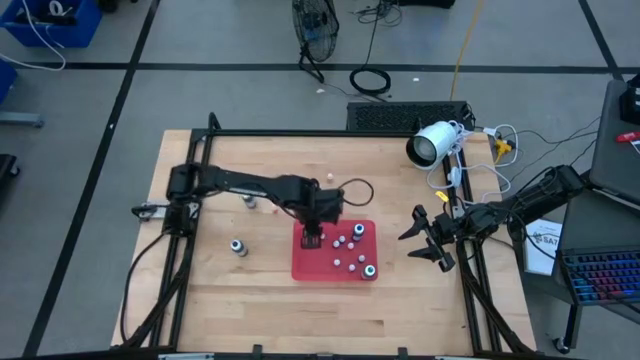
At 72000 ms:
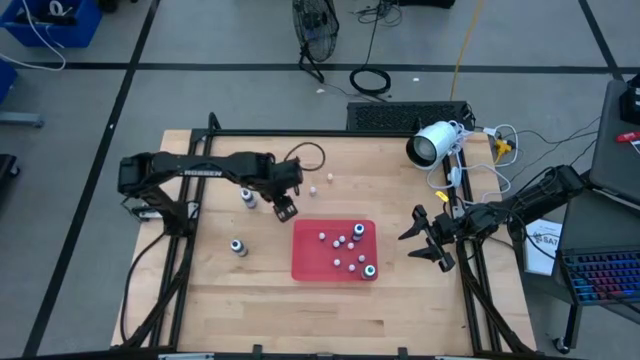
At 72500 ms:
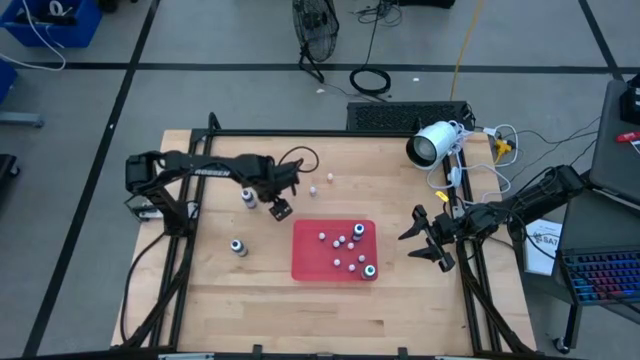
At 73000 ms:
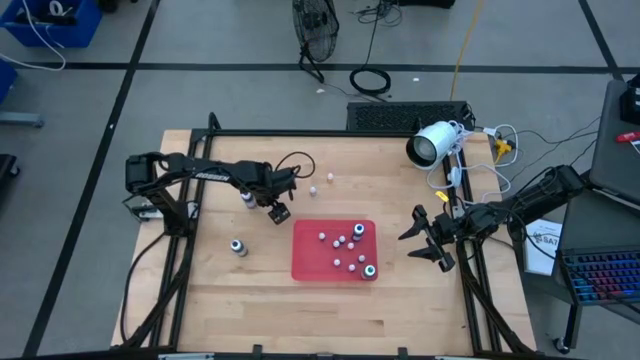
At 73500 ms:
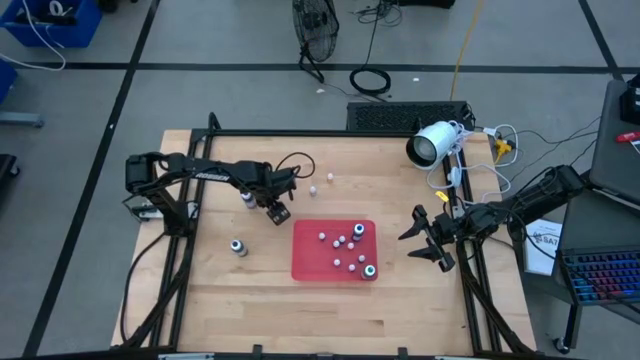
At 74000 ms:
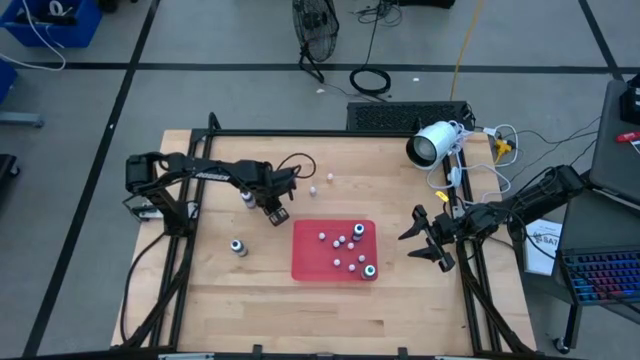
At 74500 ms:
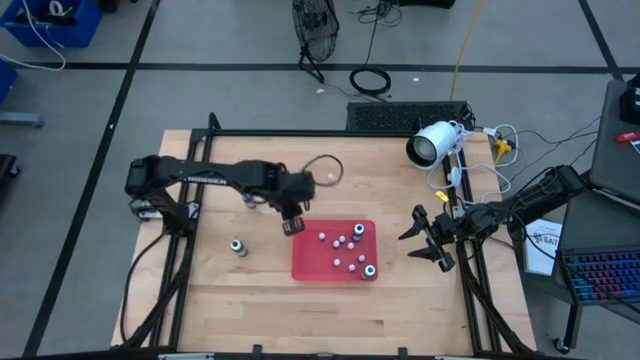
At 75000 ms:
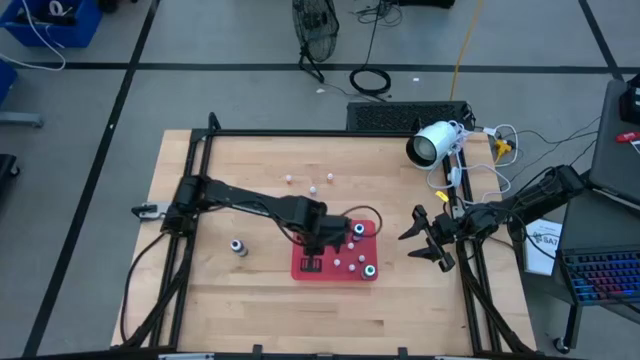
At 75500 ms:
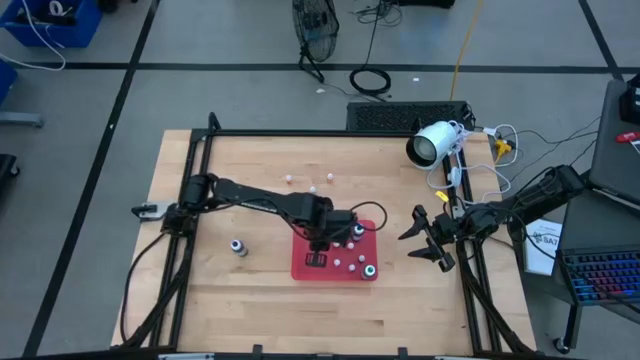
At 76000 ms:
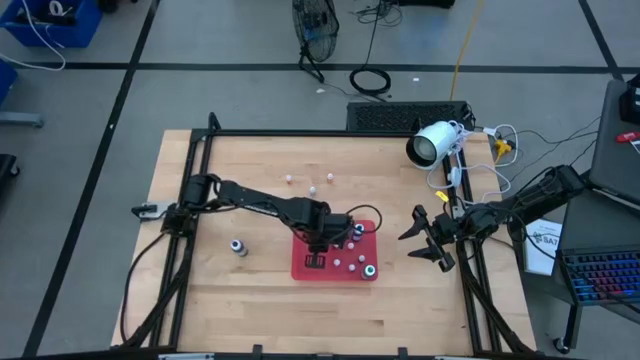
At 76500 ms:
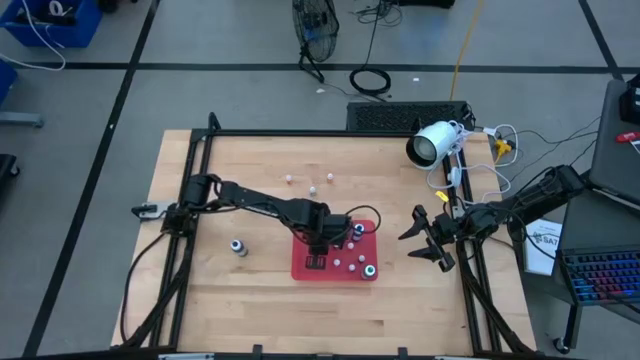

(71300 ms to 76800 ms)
Task: Pick & Place food coloring
Put the small orange food coloring bottle into the pink bin

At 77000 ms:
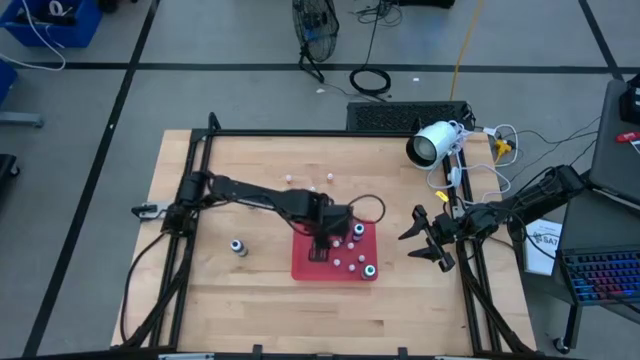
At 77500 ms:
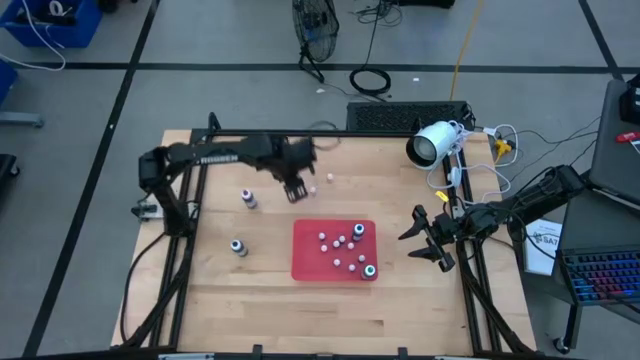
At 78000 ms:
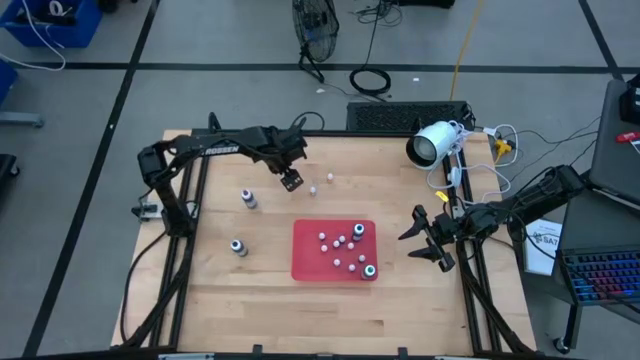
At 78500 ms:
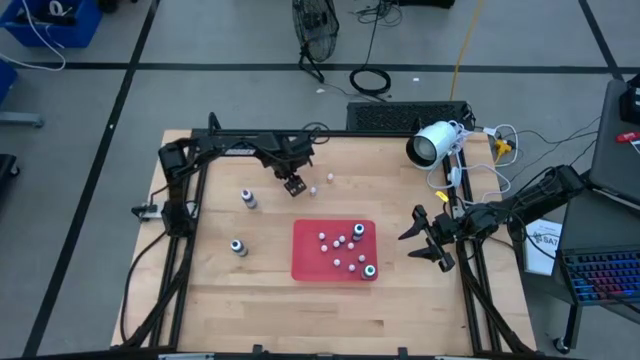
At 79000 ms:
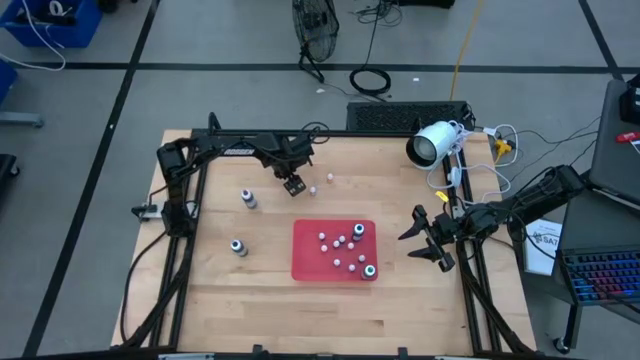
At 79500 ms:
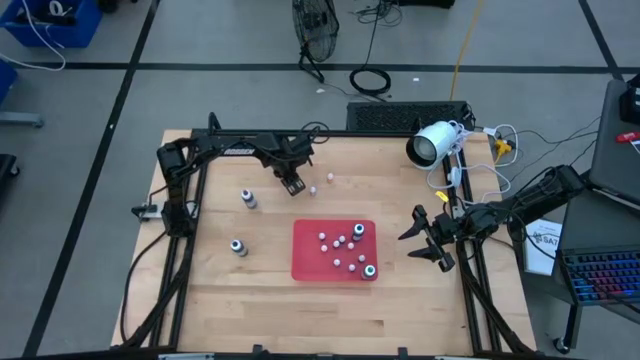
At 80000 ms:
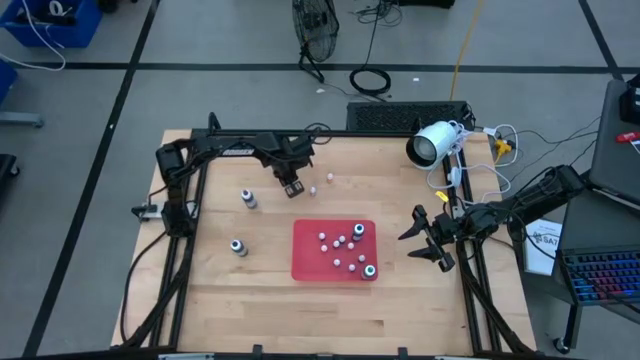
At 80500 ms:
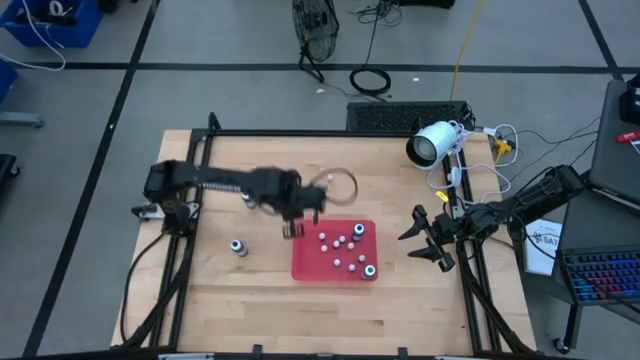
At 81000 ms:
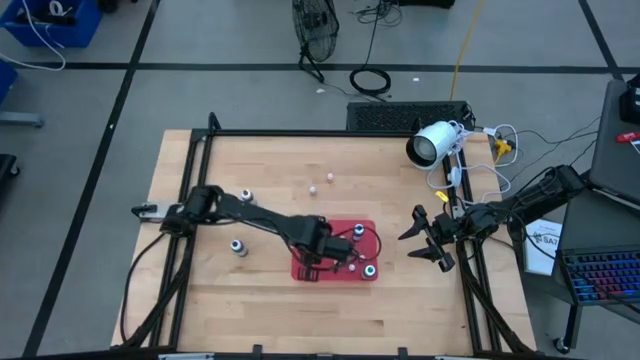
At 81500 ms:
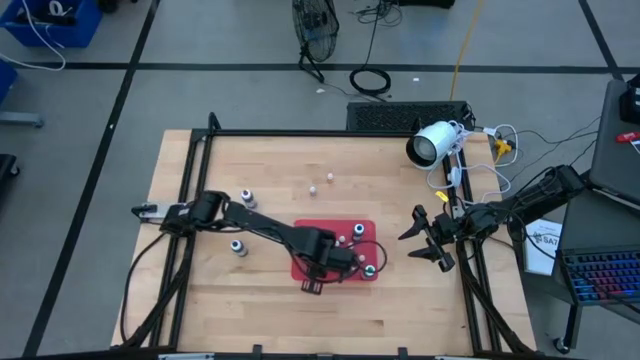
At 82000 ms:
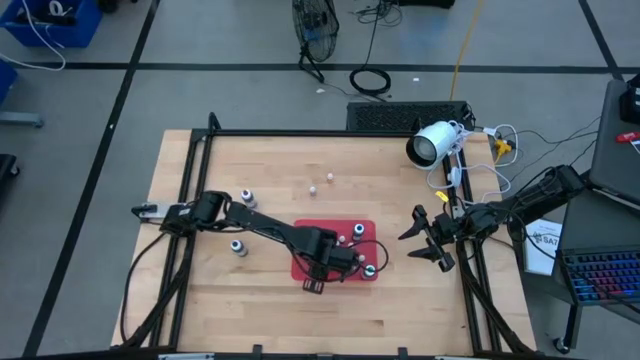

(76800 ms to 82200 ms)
Put the small orange food coloring bottle into the pink bin

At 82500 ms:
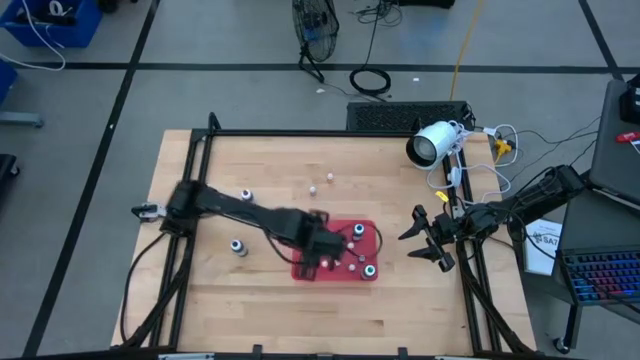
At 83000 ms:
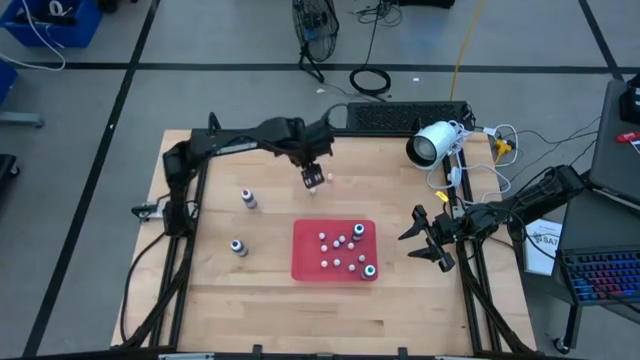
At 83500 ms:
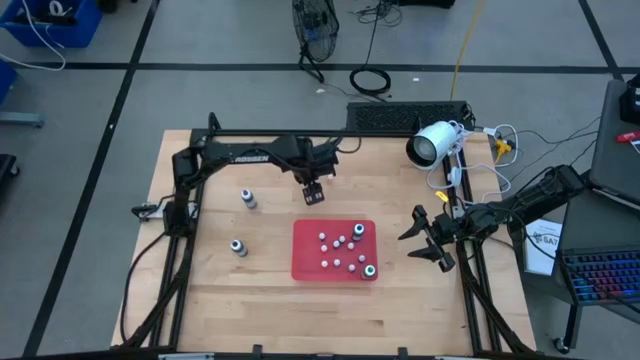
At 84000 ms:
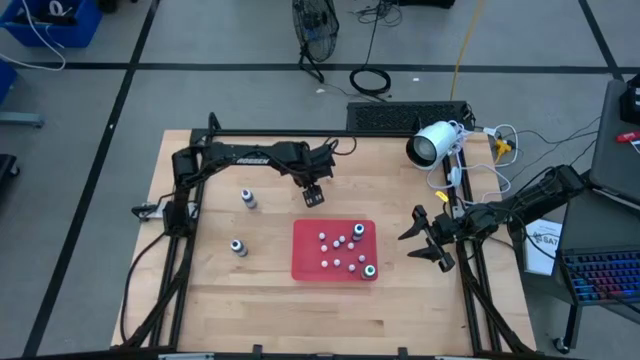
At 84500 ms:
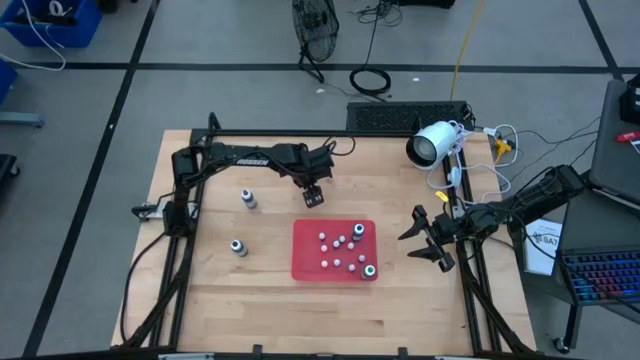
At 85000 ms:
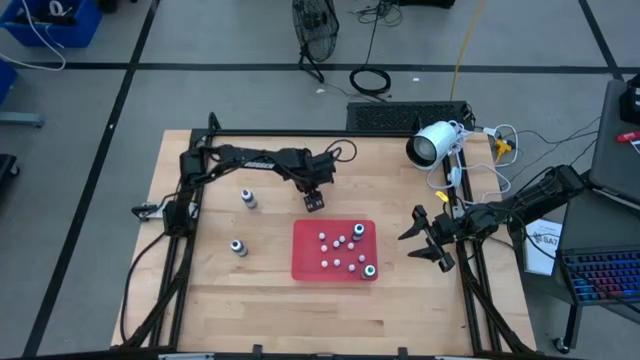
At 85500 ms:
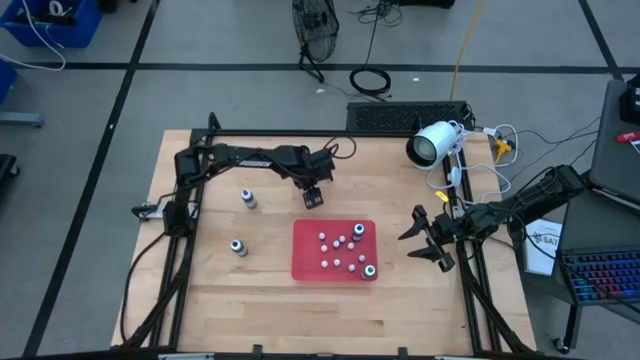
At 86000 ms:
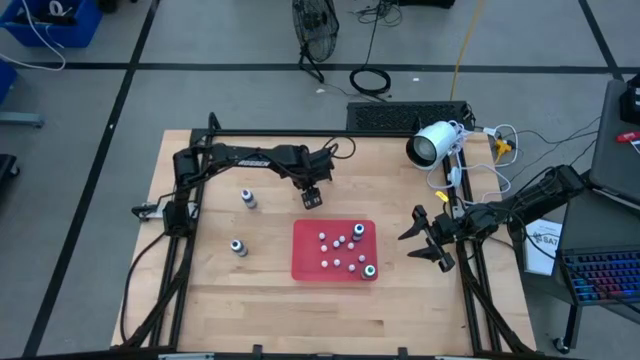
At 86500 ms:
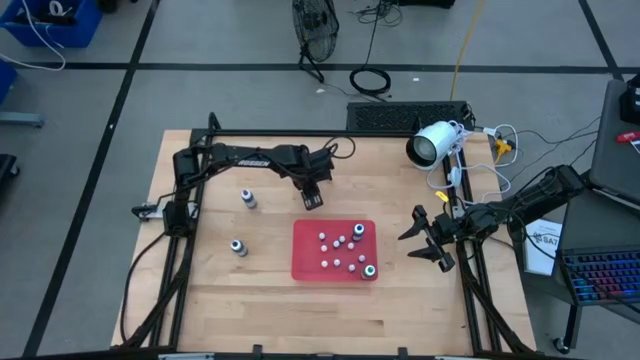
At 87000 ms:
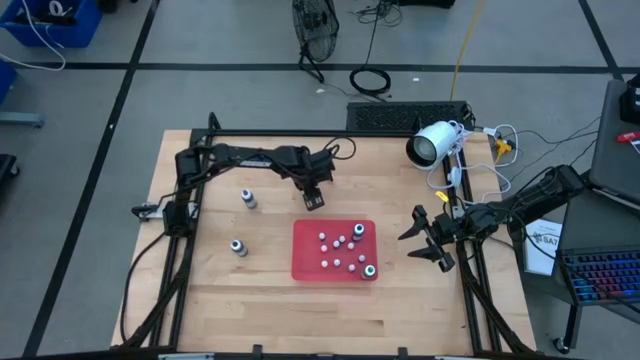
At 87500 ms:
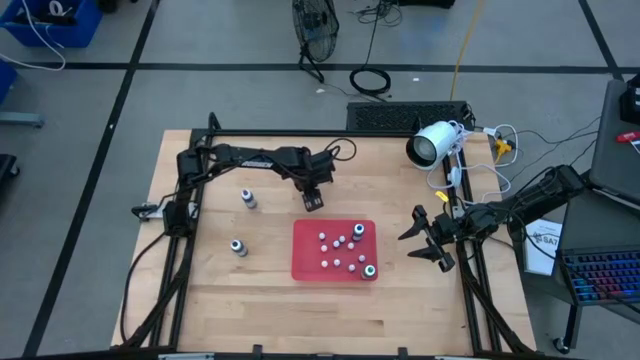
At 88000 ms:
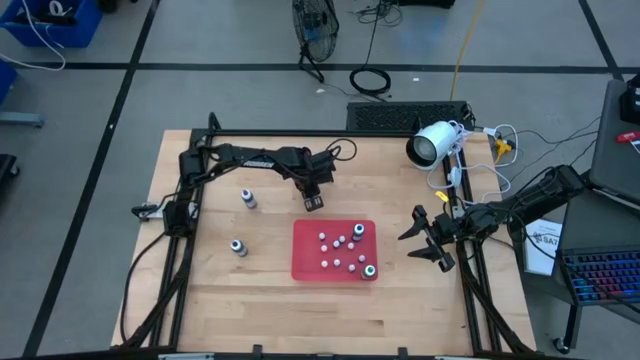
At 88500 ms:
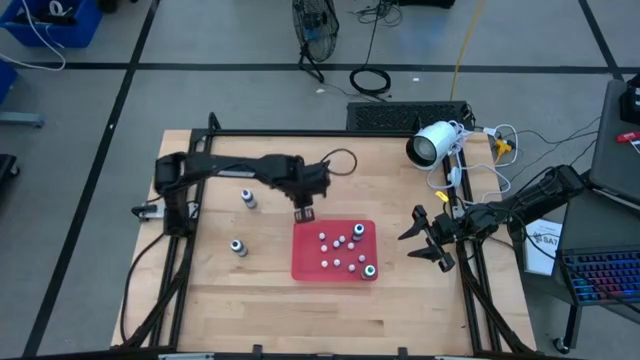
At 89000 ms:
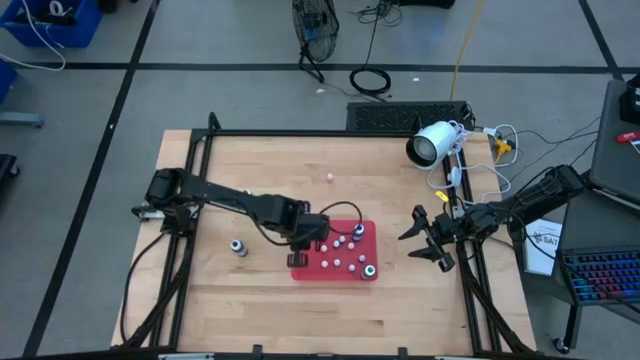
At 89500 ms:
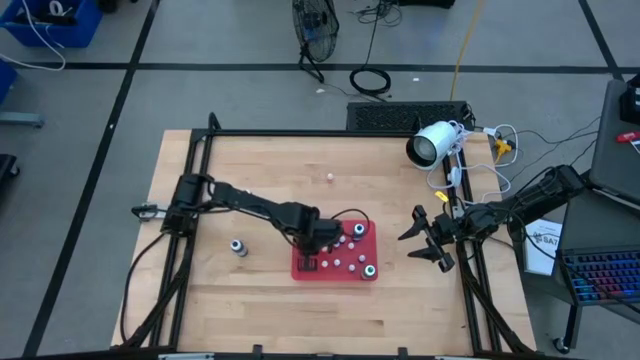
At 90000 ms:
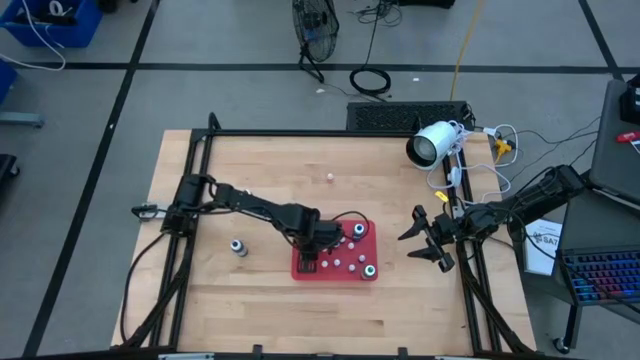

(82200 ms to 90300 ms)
Put the small black food coloring bottle into the pink bin

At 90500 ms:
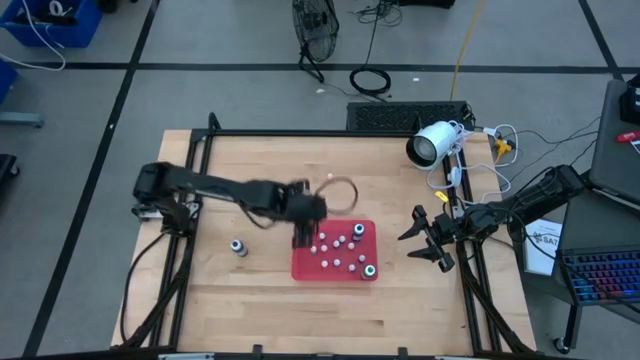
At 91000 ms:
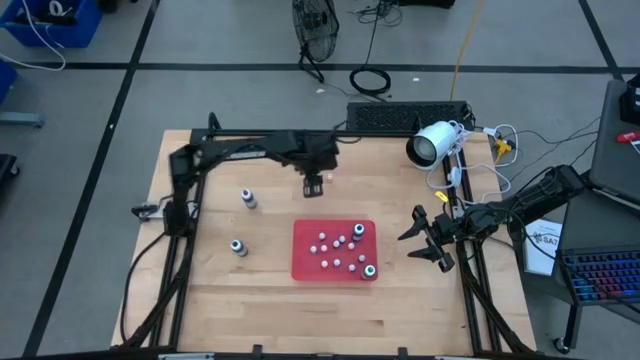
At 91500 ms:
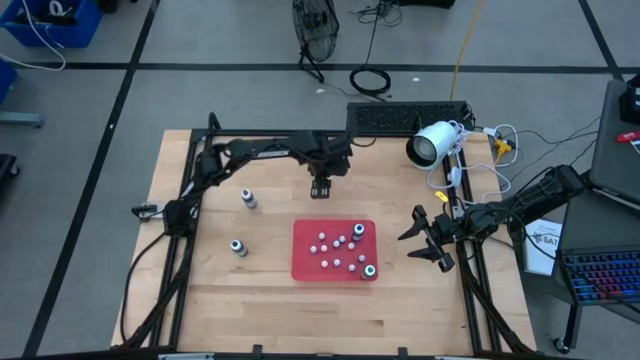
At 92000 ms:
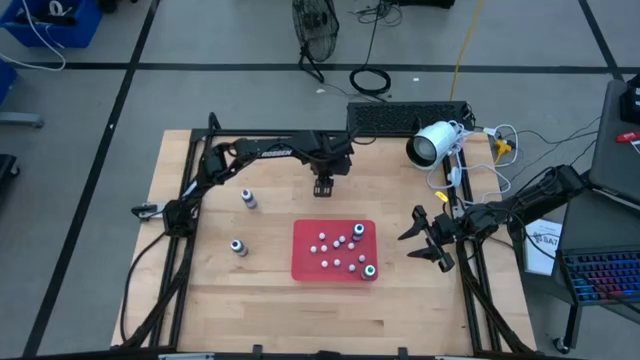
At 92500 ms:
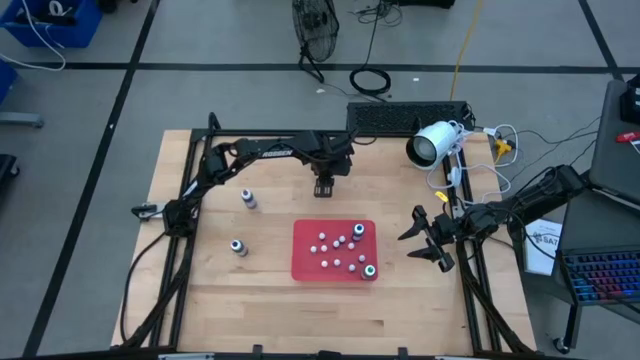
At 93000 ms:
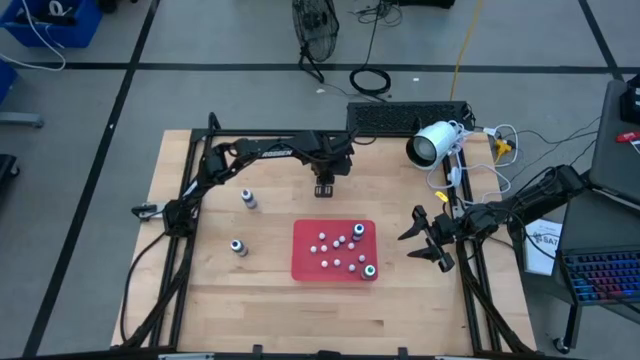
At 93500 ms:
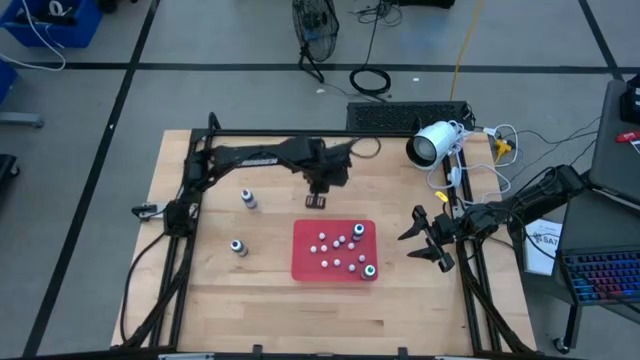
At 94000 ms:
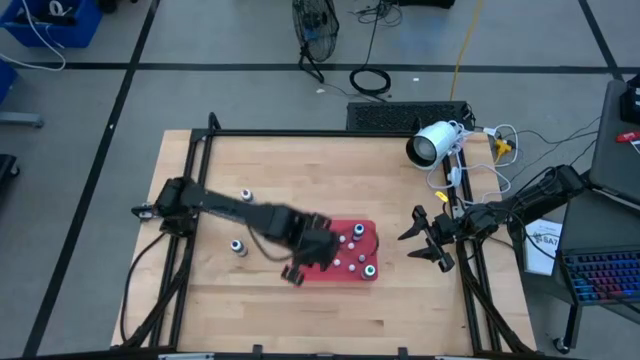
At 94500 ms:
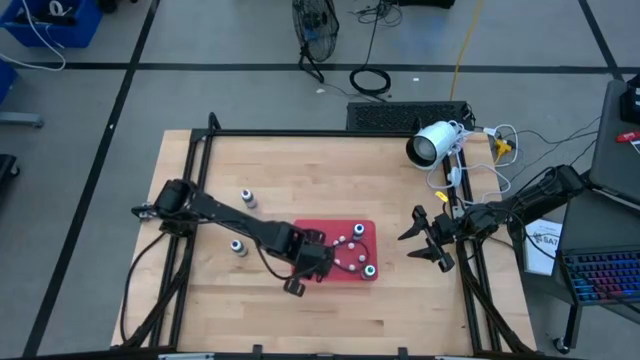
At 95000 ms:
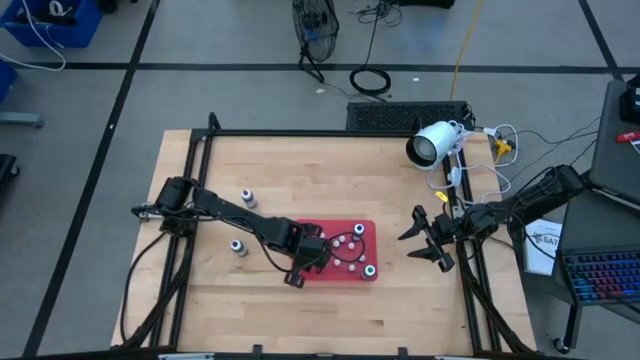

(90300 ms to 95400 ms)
Put the small orange food coloring bottle into the pink bin
